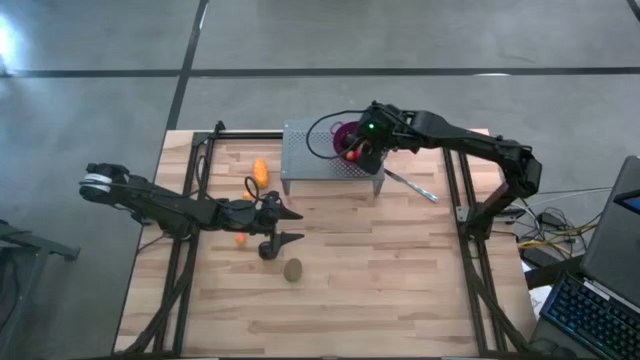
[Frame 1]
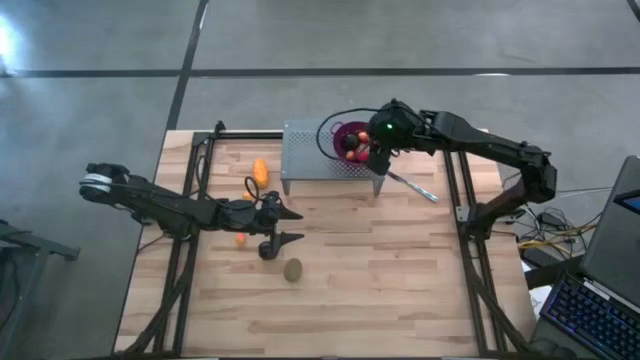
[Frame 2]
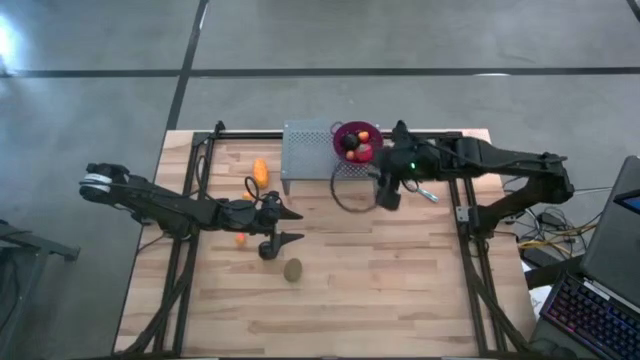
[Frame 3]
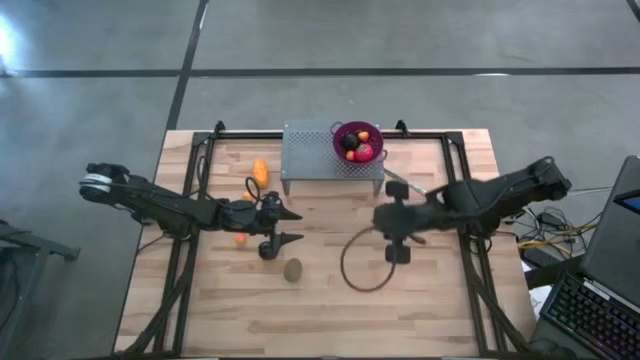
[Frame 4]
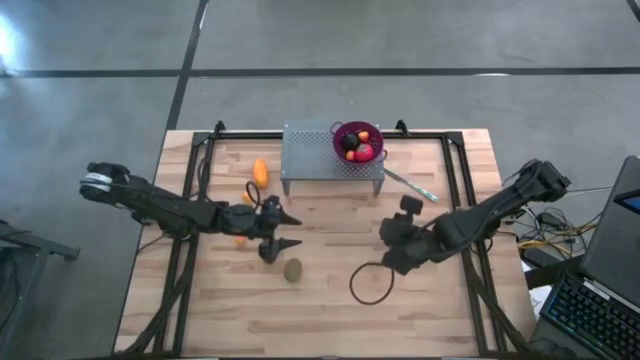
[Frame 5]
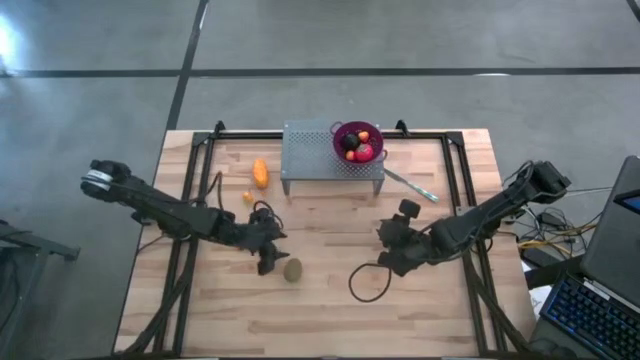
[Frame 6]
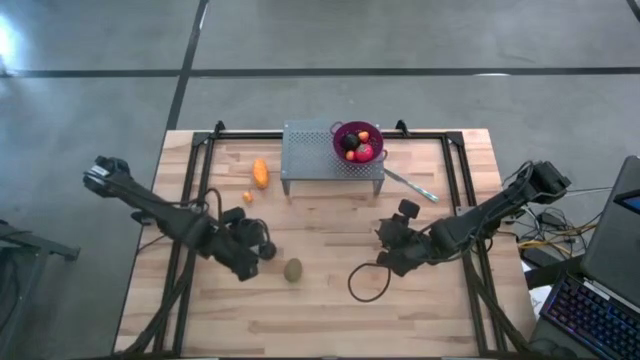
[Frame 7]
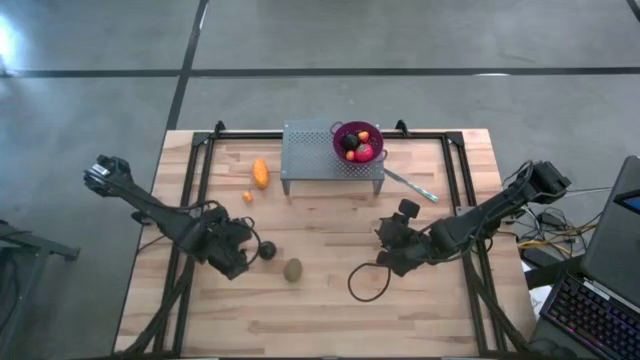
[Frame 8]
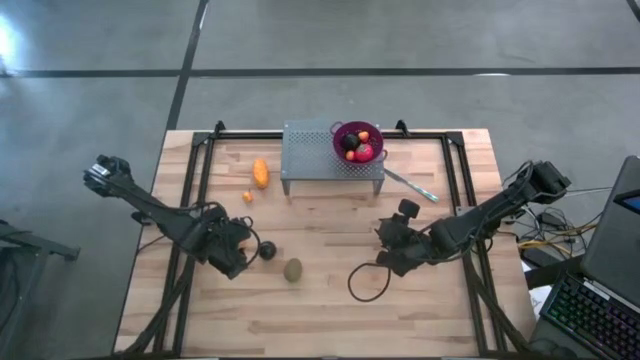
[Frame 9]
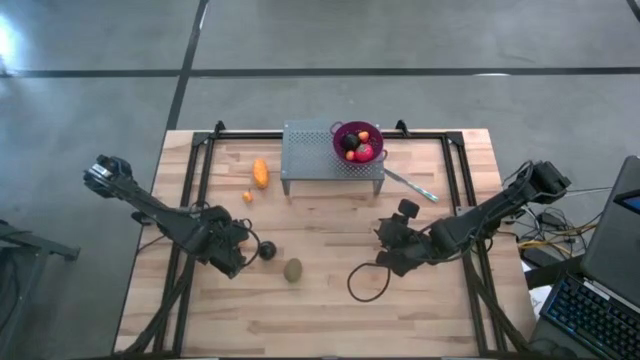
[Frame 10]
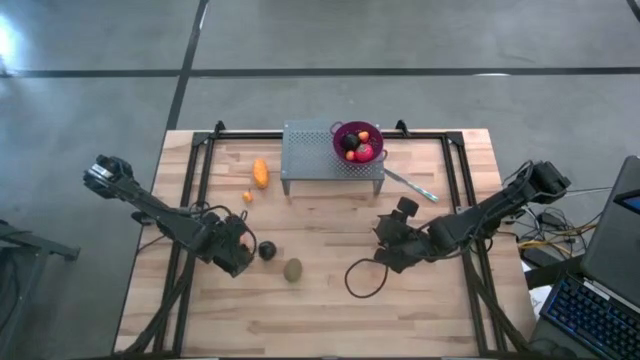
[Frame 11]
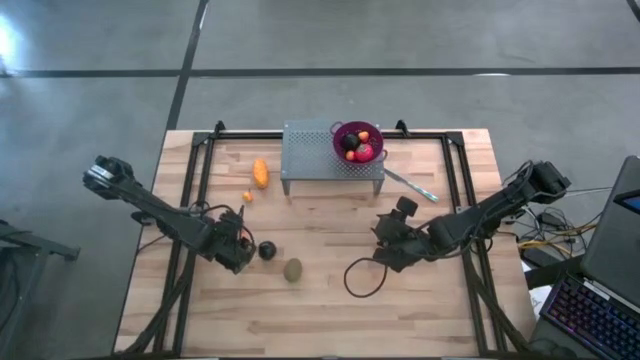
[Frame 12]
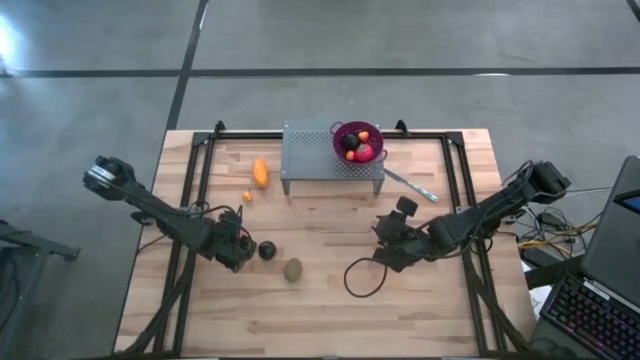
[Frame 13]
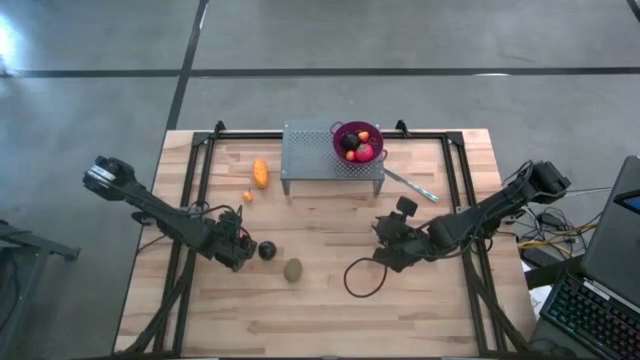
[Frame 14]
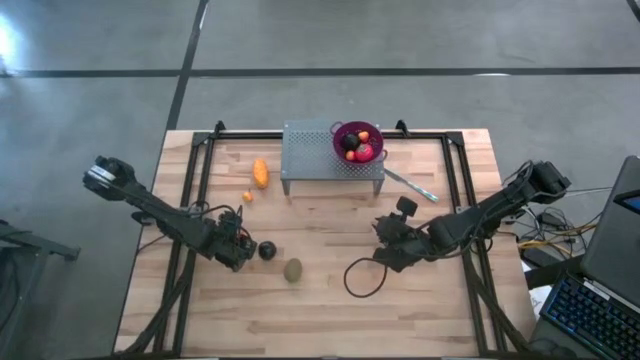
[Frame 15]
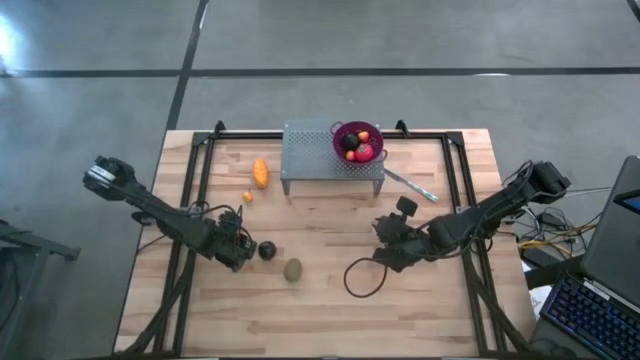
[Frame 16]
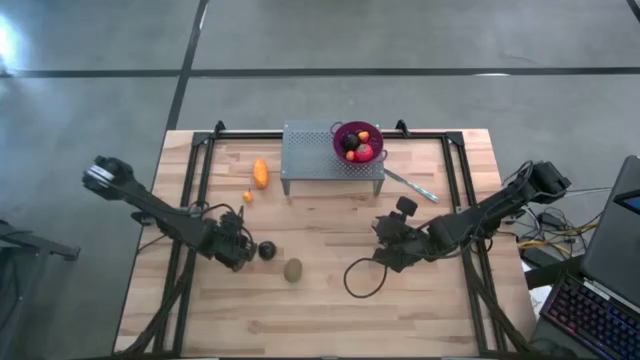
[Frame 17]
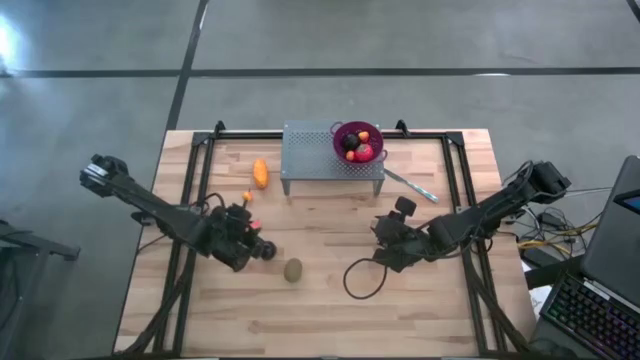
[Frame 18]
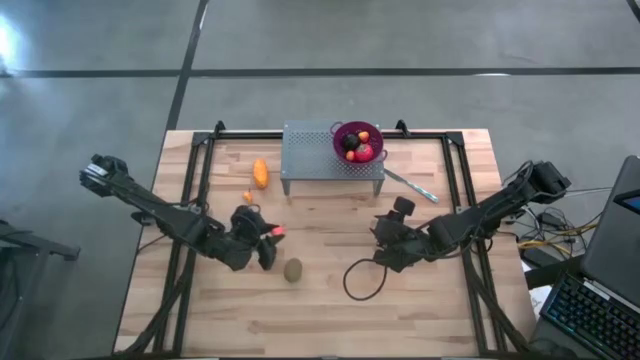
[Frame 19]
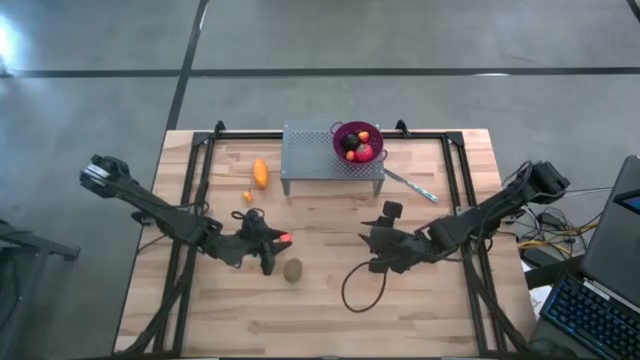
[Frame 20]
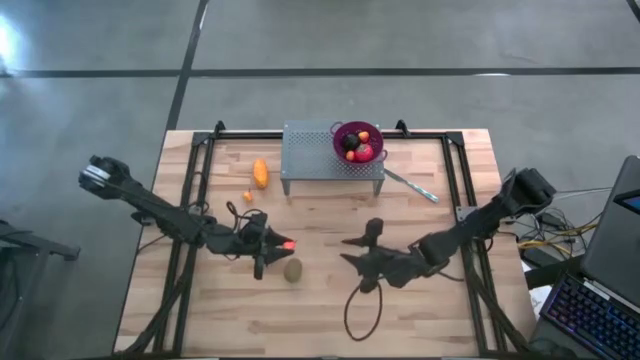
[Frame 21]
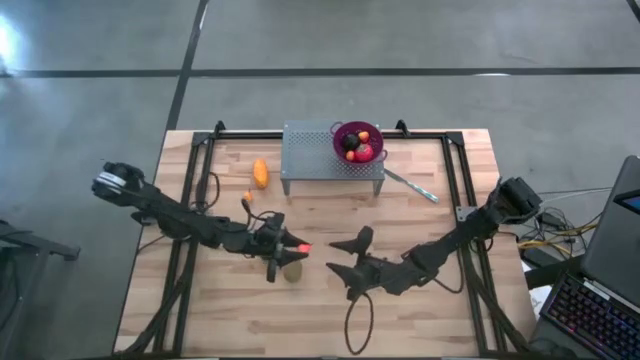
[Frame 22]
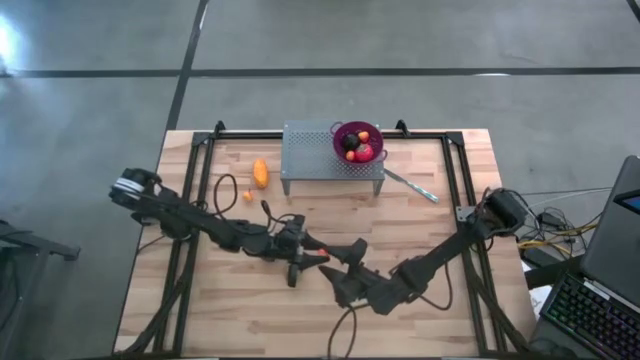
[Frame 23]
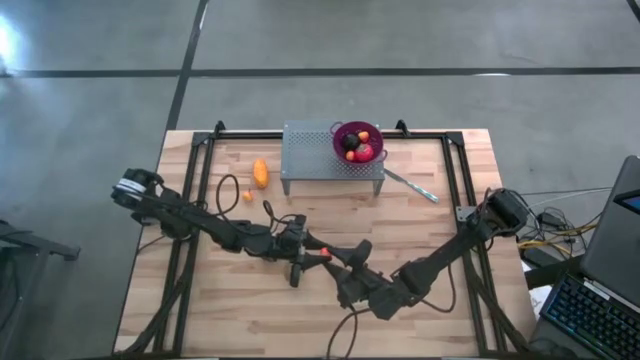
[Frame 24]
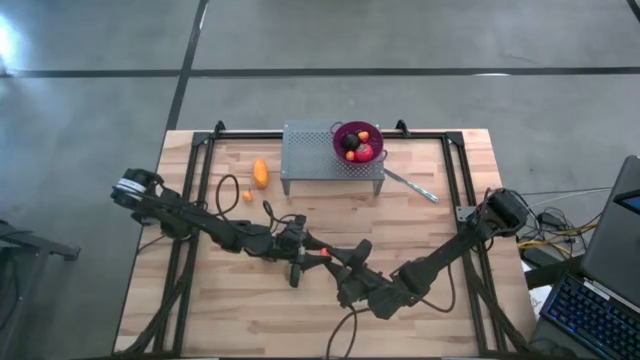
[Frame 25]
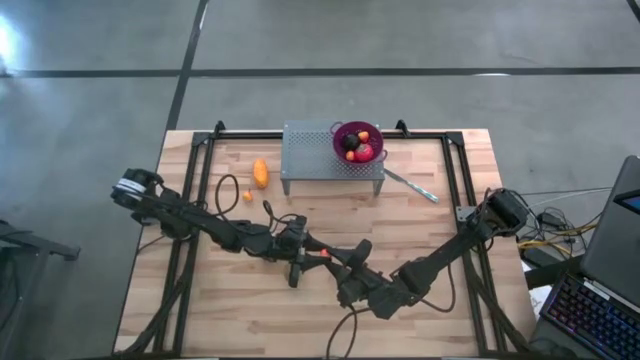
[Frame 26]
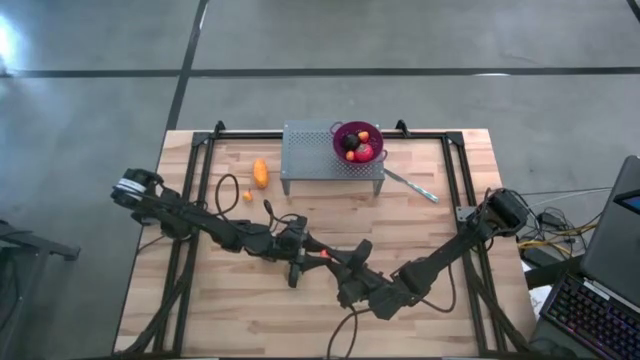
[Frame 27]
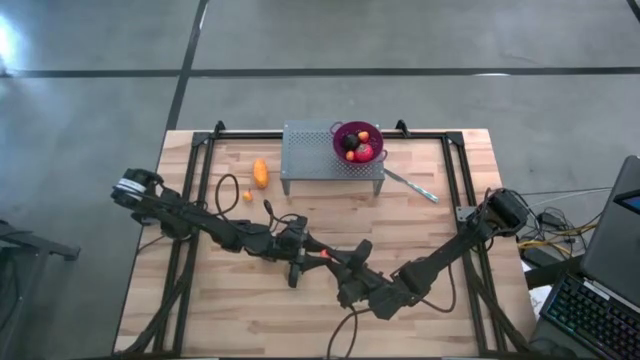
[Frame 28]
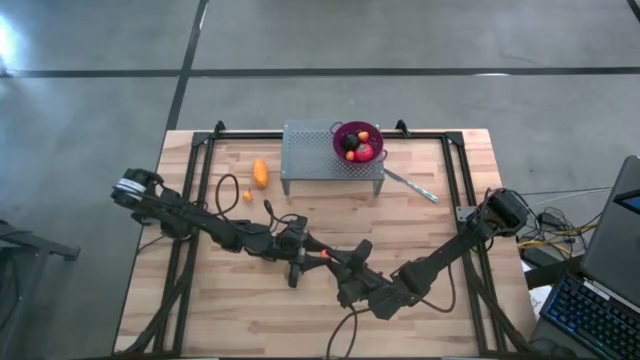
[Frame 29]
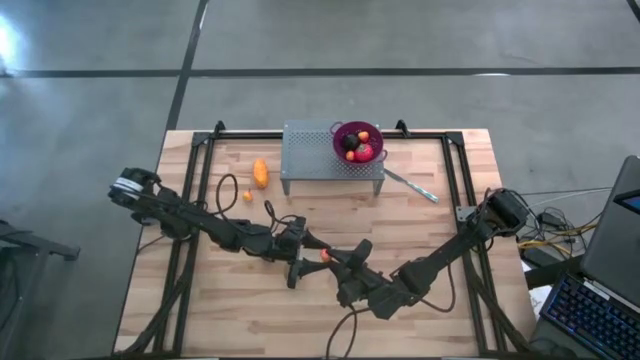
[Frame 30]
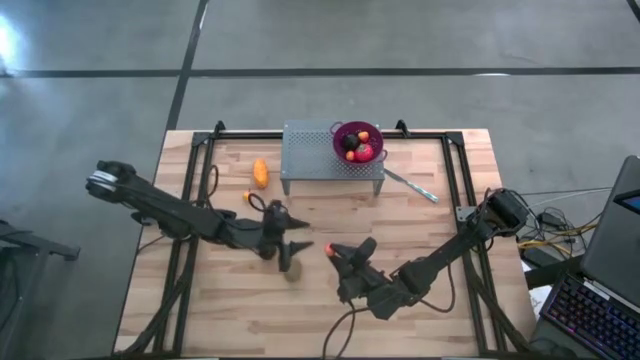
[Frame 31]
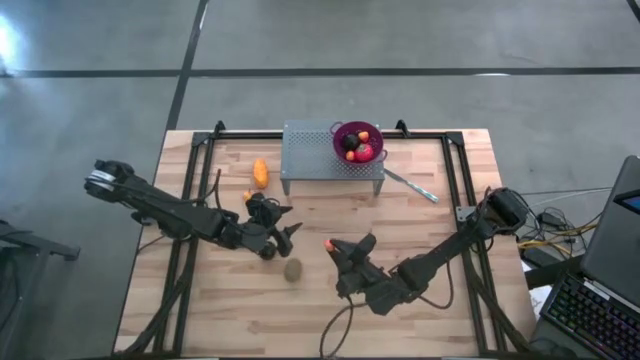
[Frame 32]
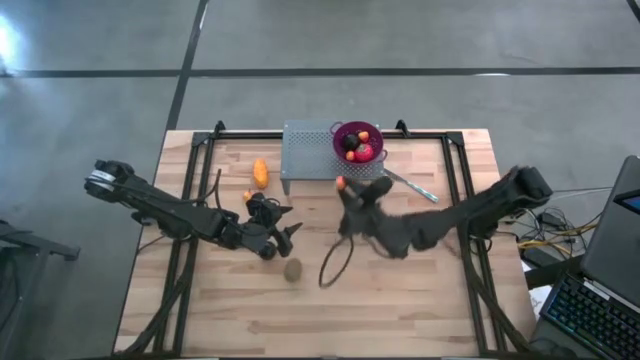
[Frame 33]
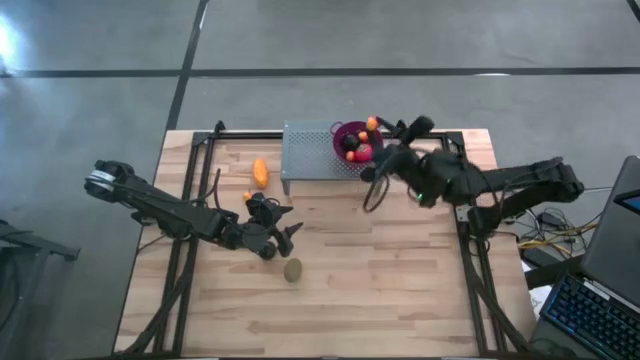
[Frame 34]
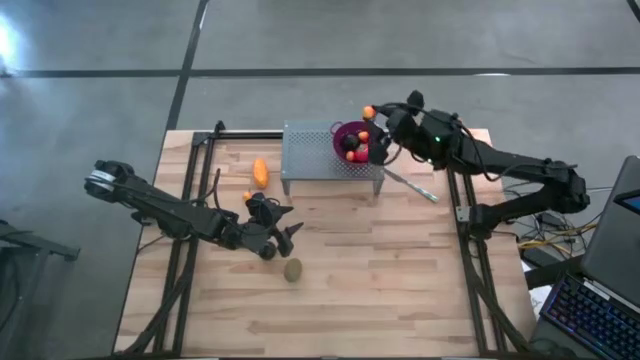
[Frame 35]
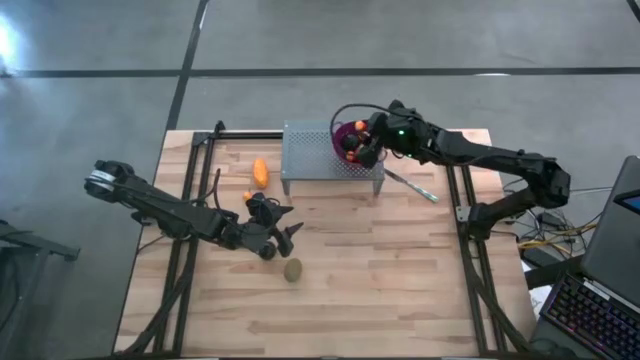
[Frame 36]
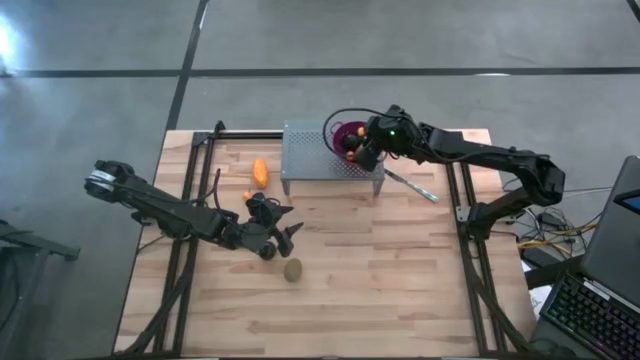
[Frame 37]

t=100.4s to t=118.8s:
Task: Pick & Place Fruit
Put the pear into the purple strainer bowl on the shelf

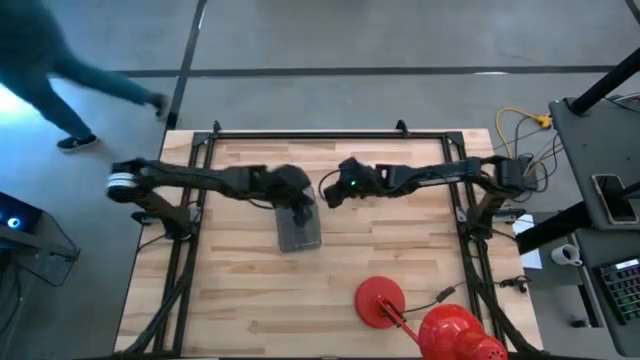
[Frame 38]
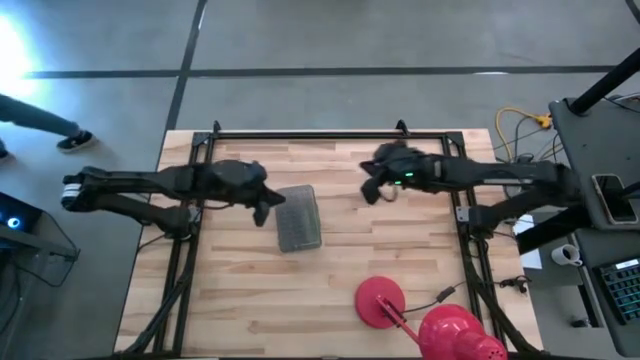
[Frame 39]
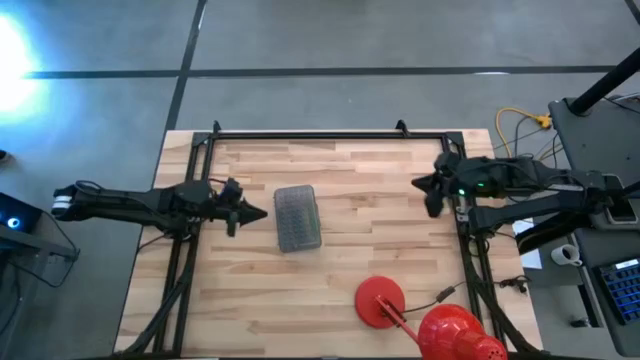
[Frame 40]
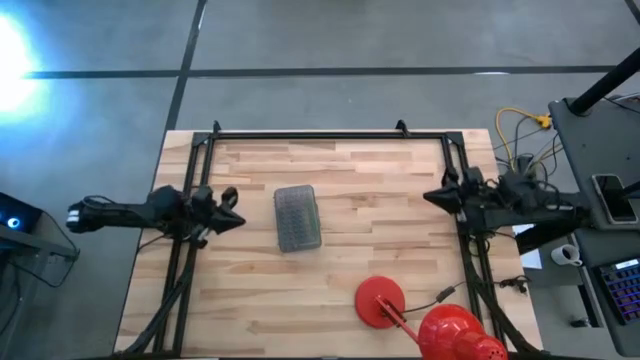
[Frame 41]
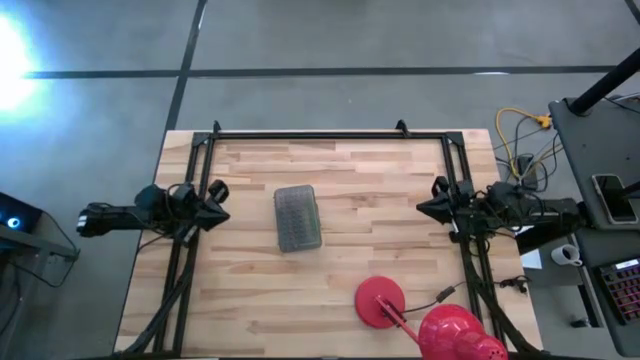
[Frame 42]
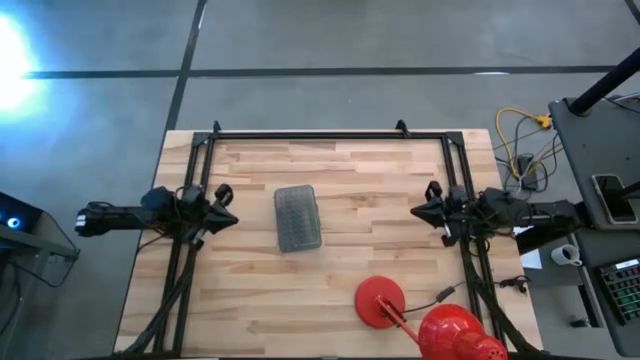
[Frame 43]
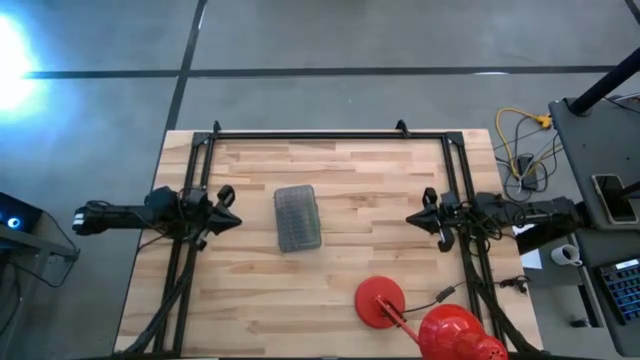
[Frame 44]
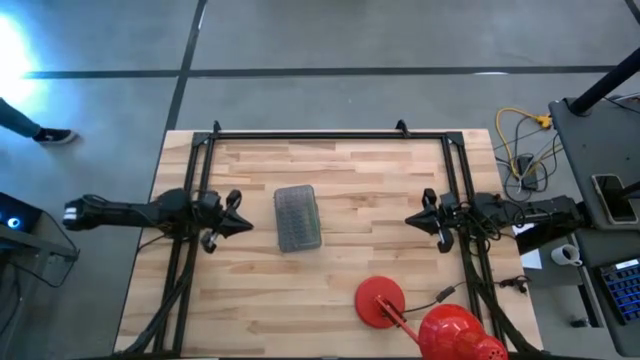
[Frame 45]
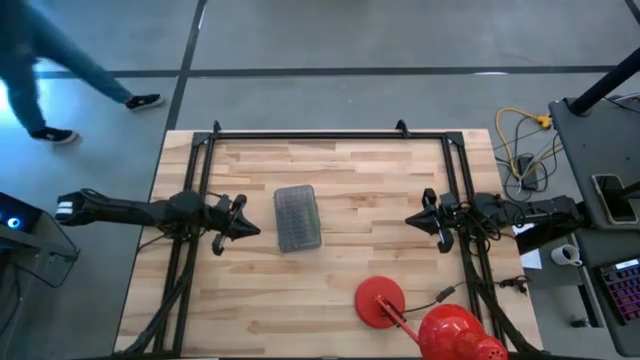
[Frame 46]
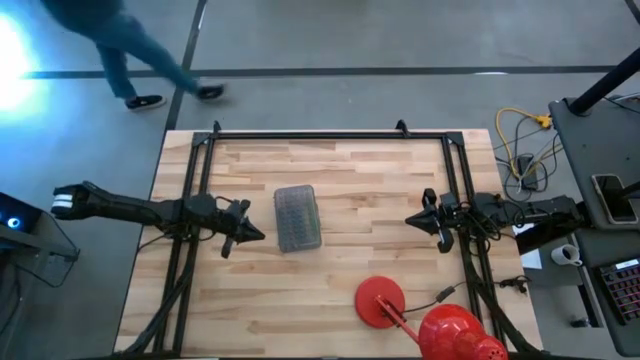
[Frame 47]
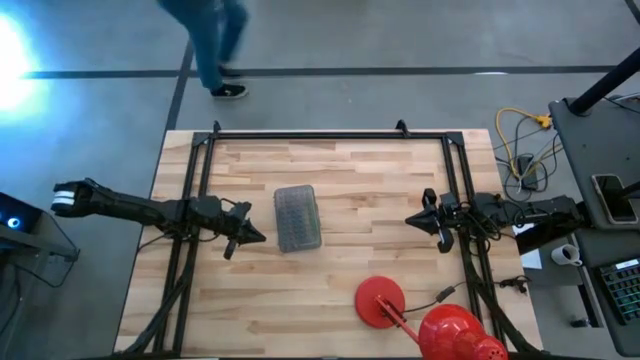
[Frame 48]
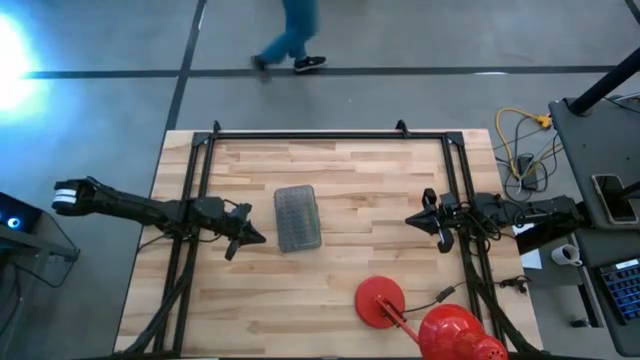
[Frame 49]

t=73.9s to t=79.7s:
Task: Pick & place school supplies into a supply box
Return to Home Position
